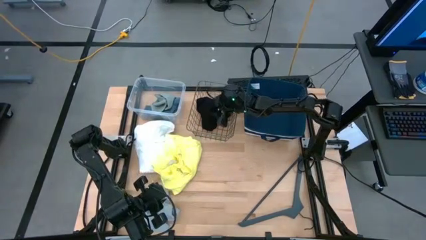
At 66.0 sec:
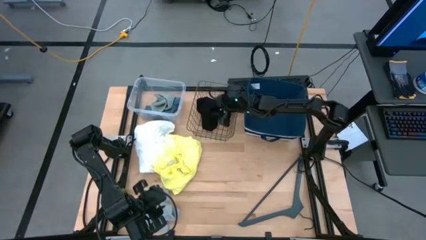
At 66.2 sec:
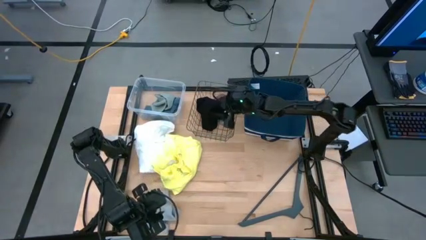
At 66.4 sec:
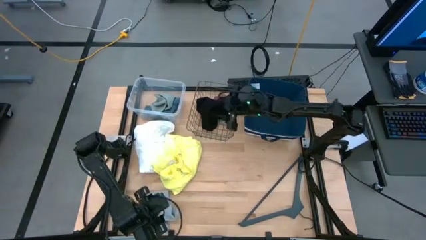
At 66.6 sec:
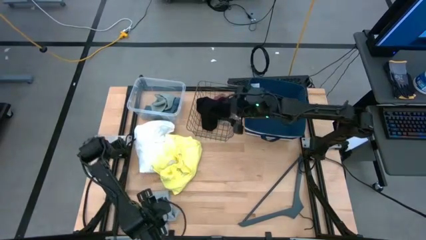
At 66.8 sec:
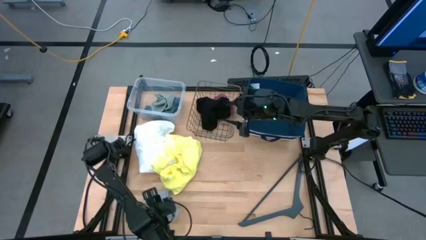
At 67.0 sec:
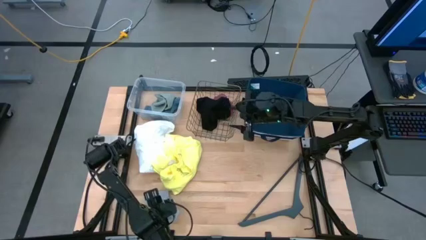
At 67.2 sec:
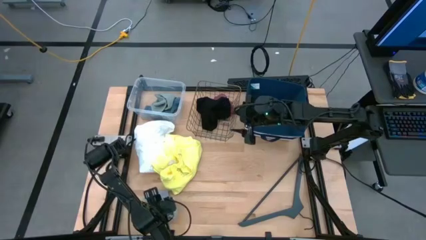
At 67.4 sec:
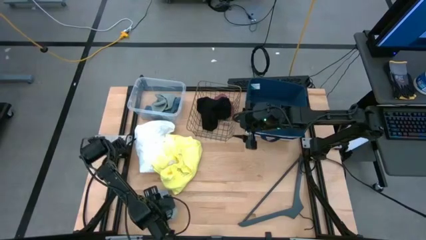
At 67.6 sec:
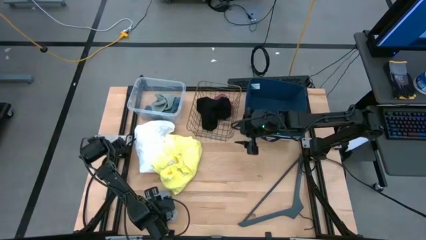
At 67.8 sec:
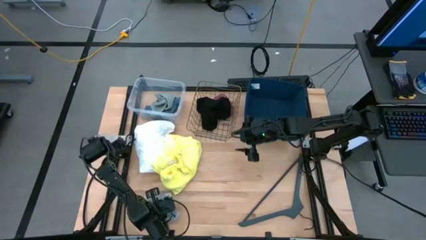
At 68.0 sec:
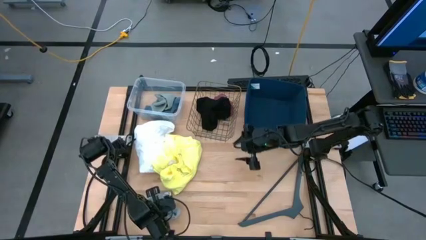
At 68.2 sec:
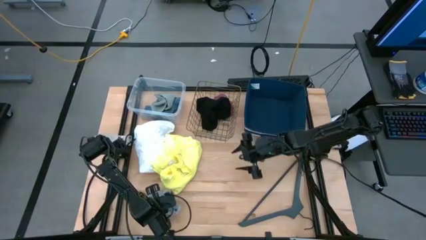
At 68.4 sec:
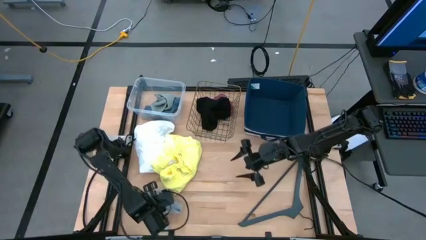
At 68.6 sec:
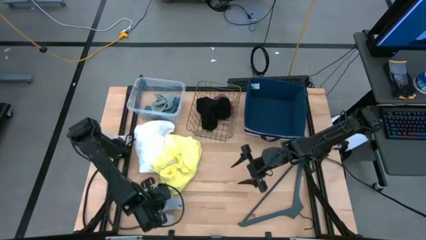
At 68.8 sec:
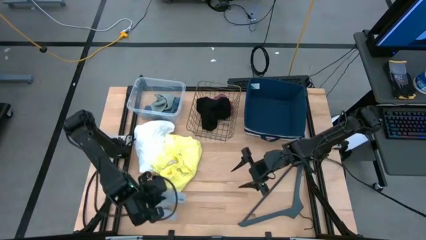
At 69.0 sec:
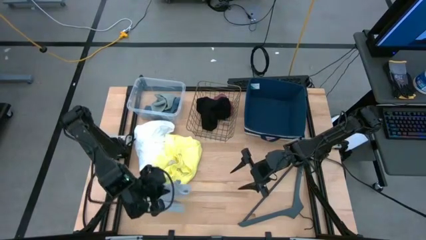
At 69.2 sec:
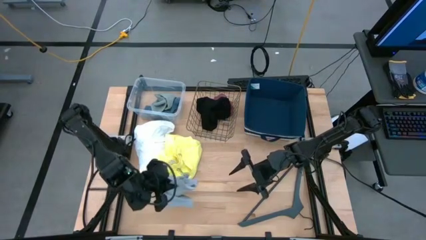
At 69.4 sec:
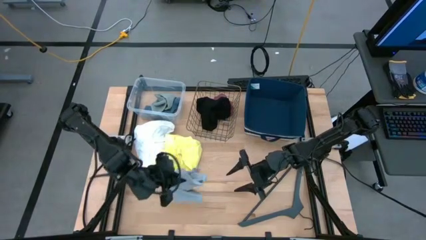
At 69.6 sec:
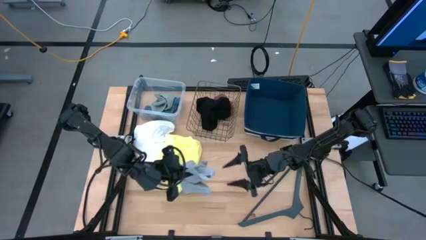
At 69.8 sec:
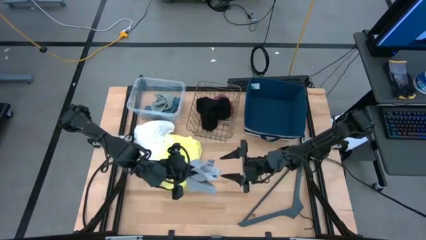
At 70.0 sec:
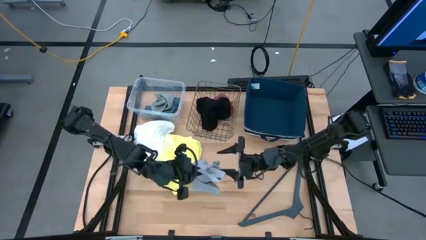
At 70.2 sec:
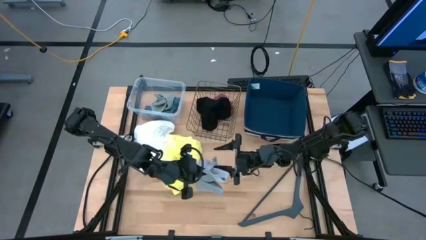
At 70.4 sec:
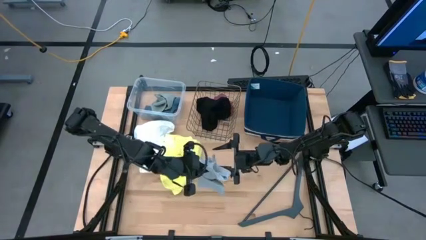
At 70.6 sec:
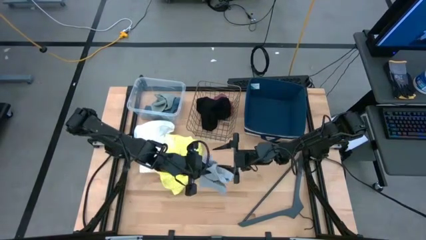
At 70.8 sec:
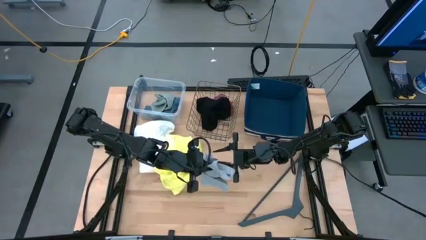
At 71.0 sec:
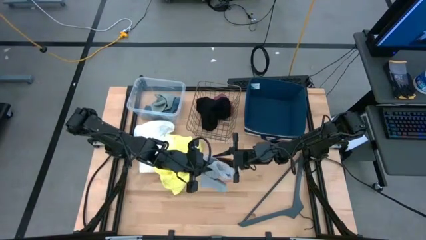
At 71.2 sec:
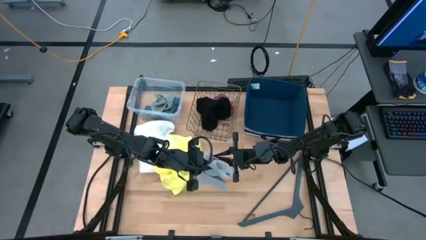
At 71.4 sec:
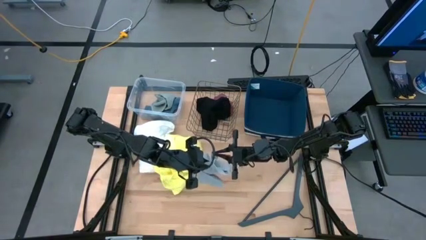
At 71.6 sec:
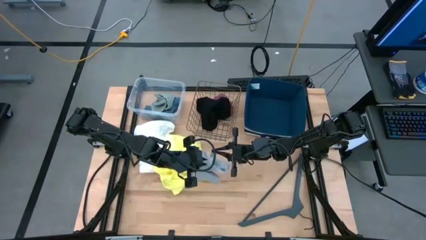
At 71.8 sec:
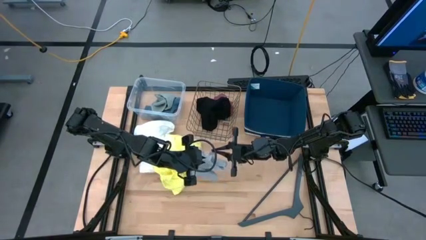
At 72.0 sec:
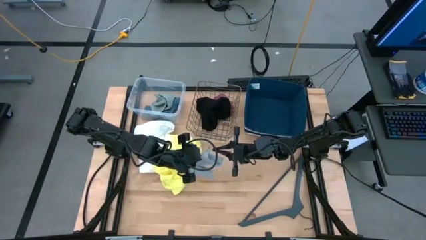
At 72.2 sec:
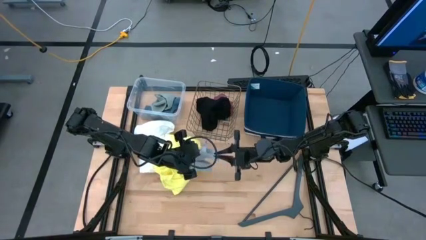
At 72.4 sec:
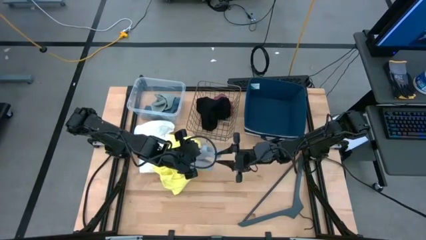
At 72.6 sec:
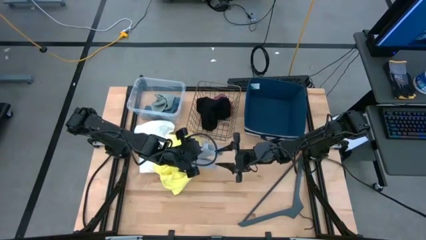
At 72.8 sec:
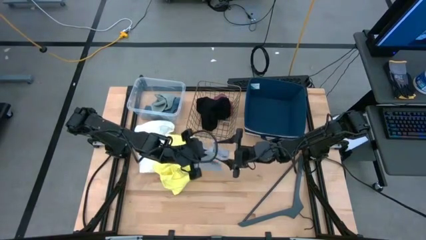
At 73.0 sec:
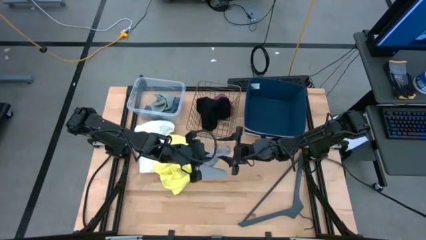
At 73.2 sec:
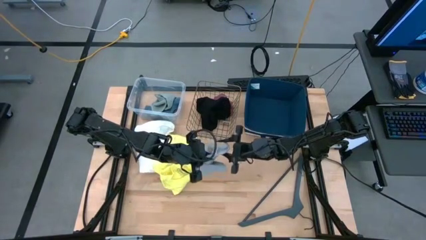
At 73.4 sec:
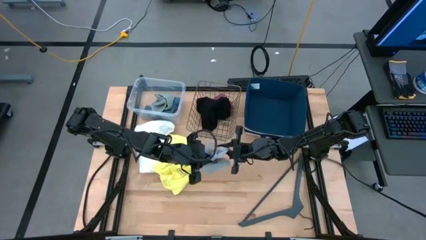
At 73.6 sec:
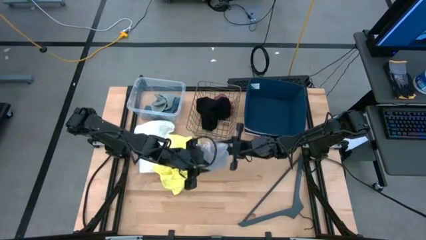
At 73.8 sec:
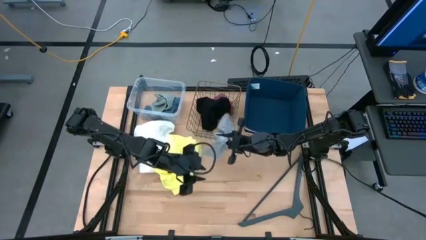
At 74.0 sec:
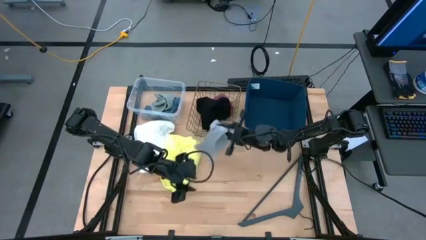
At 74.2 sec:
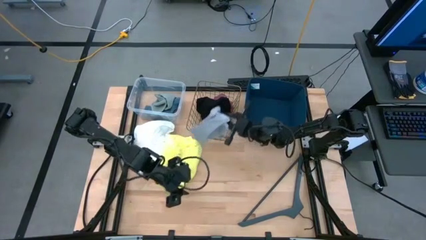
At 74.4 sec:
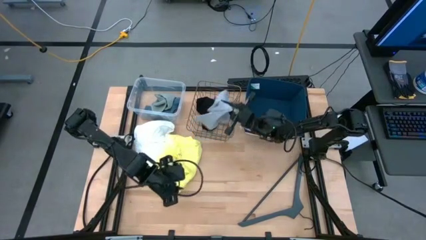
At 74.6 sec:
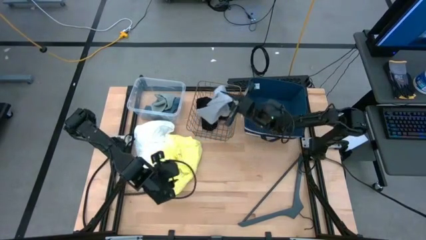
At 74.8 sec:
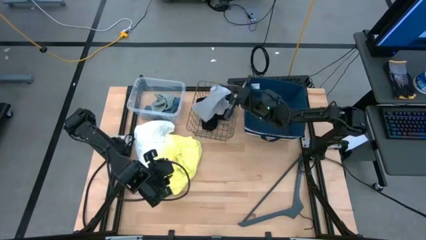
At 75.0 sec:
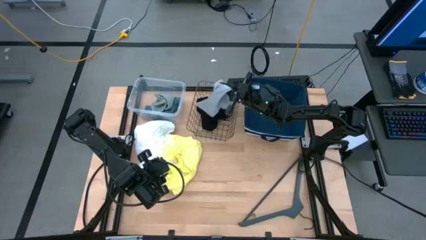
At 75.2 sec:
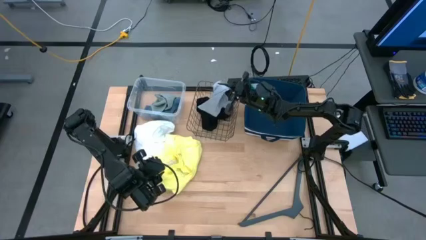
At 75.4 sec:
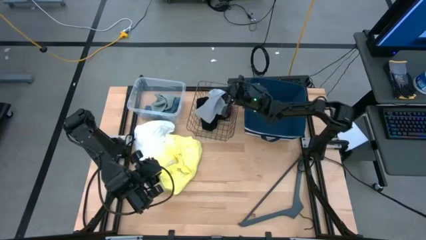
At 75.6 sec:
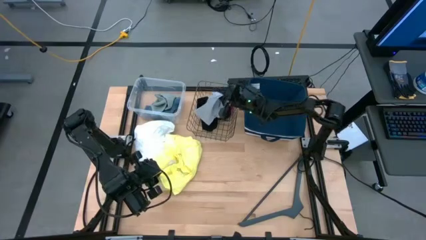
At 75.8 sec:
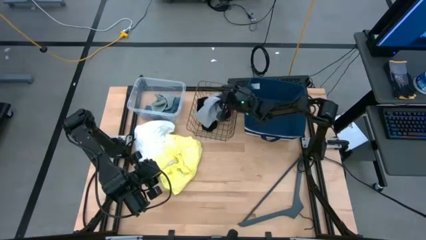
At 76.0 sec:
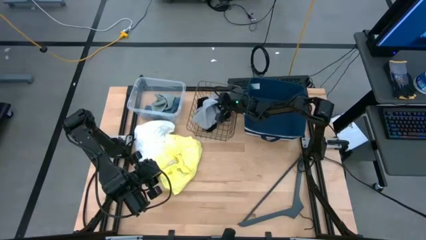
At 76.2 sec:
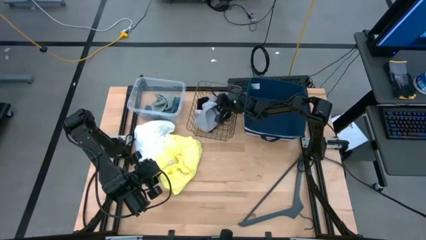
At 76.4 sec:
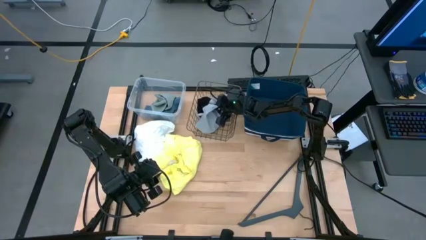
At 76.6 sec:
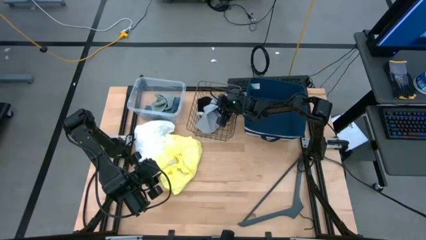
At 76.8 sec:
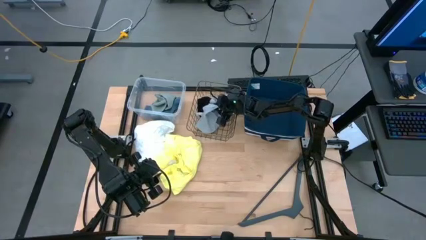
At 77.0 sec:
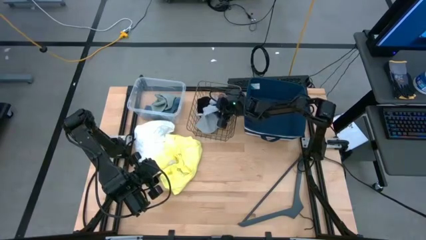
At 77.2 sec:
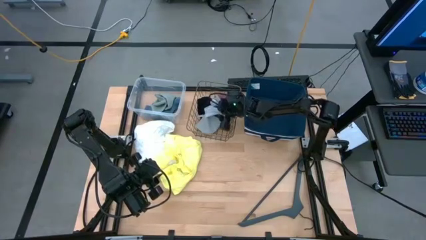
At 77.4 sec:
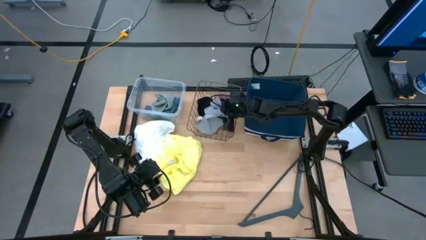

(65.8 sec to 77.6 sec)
Task: Pick & Place Cloths
Put the gray boxer into the gold wire basket

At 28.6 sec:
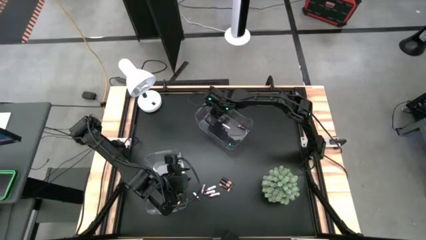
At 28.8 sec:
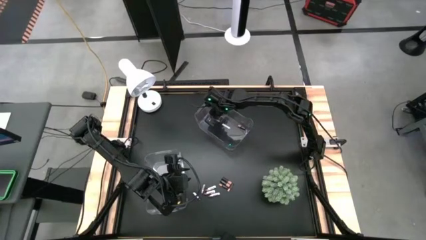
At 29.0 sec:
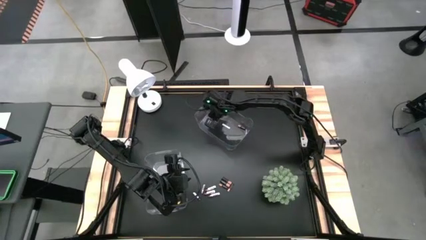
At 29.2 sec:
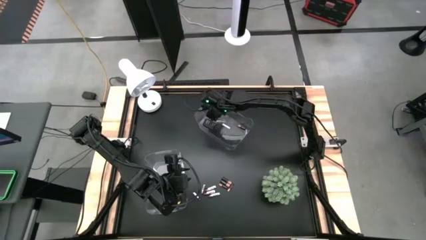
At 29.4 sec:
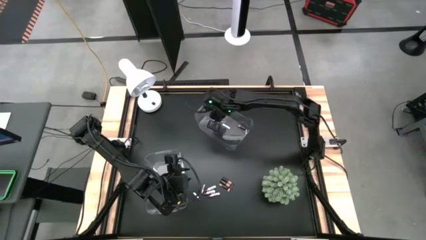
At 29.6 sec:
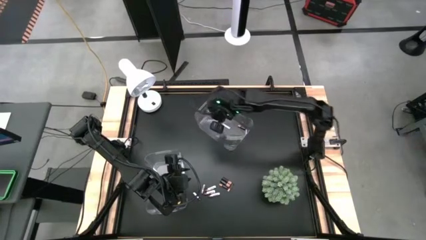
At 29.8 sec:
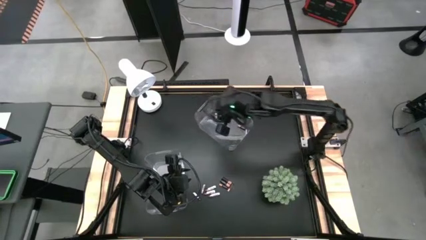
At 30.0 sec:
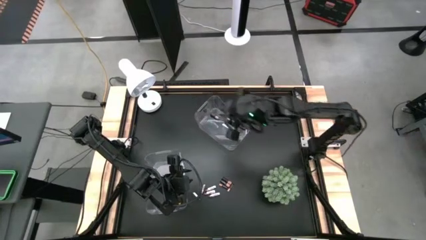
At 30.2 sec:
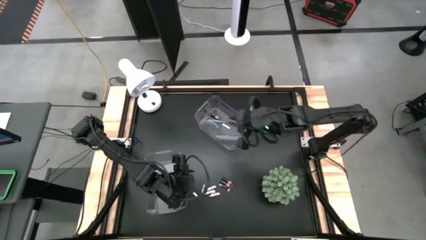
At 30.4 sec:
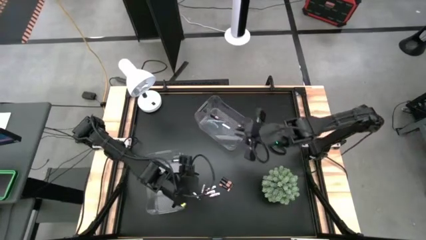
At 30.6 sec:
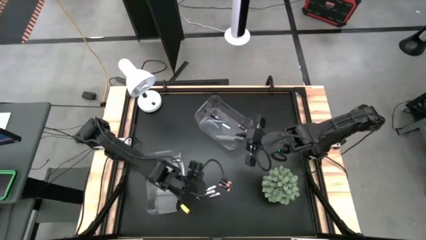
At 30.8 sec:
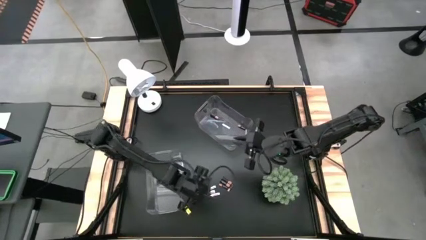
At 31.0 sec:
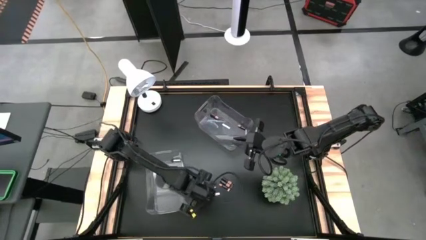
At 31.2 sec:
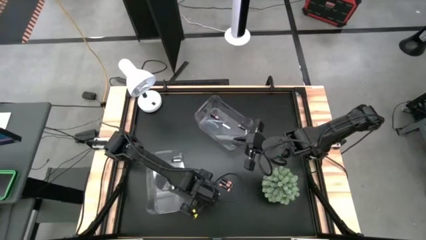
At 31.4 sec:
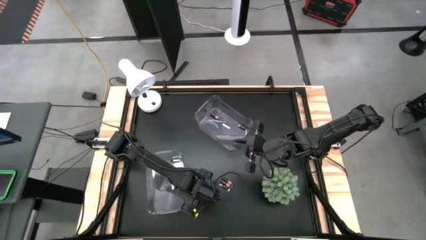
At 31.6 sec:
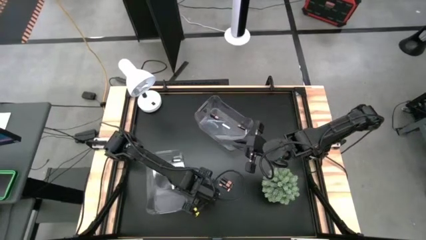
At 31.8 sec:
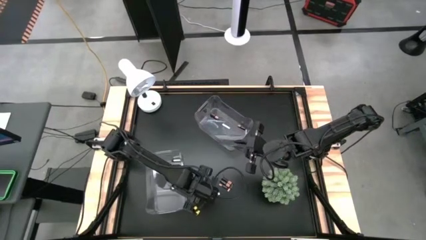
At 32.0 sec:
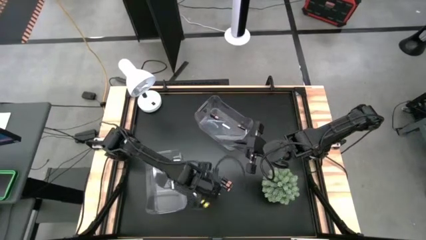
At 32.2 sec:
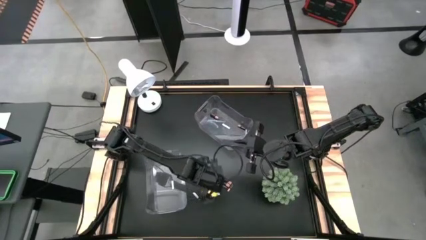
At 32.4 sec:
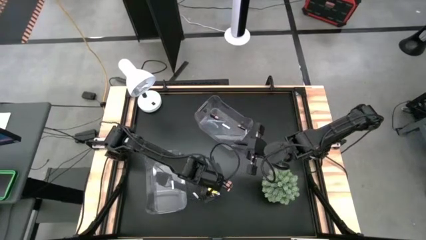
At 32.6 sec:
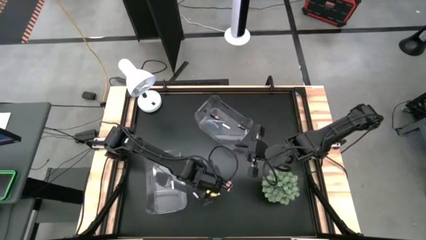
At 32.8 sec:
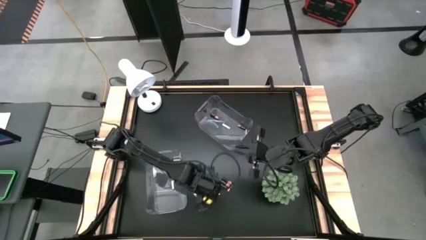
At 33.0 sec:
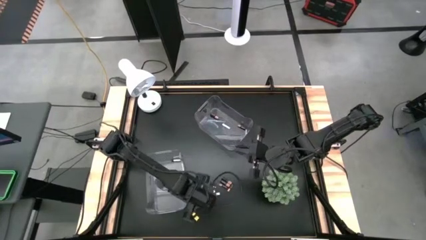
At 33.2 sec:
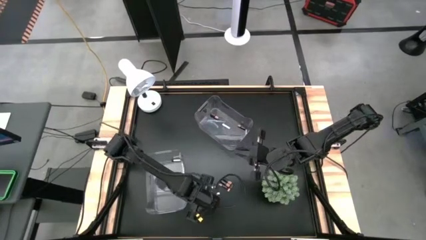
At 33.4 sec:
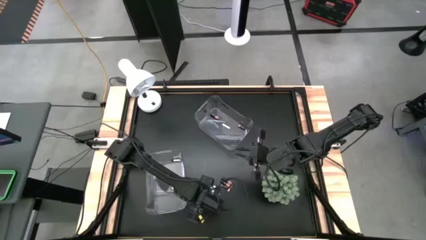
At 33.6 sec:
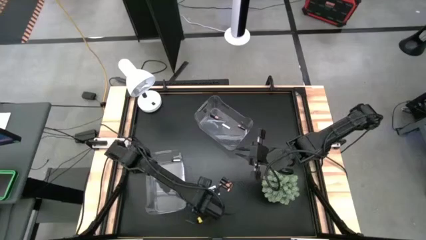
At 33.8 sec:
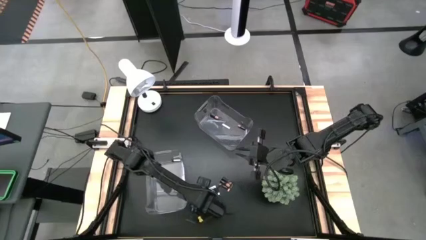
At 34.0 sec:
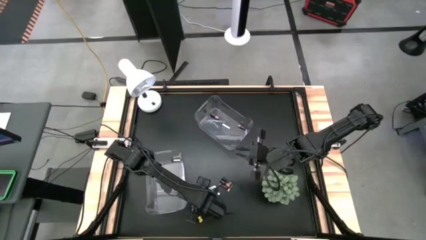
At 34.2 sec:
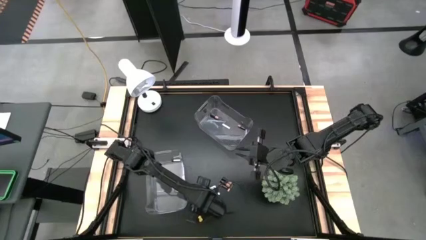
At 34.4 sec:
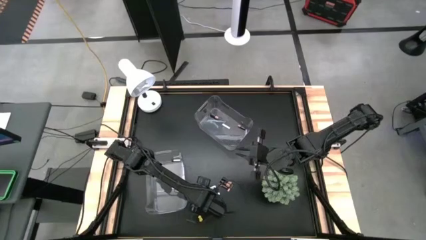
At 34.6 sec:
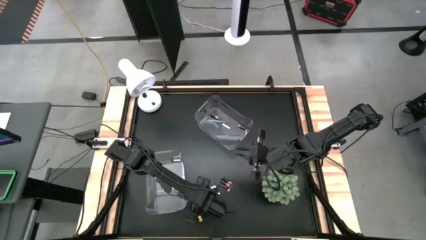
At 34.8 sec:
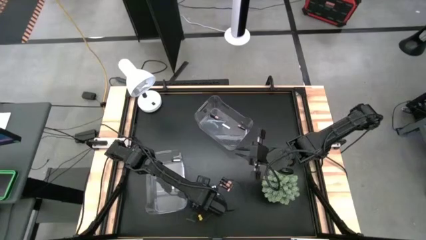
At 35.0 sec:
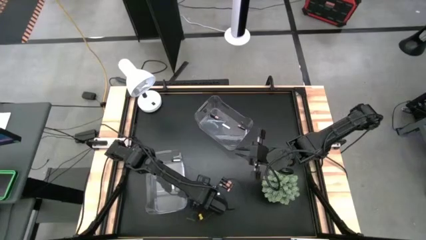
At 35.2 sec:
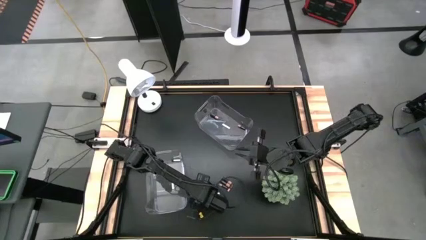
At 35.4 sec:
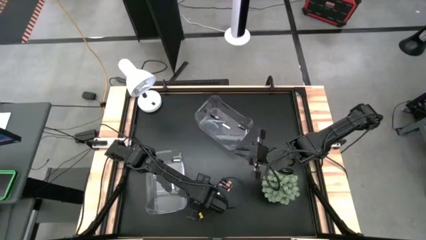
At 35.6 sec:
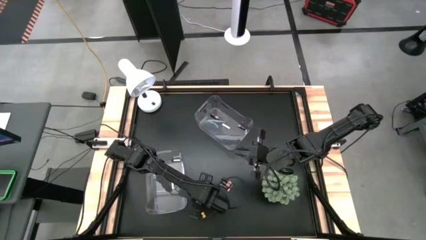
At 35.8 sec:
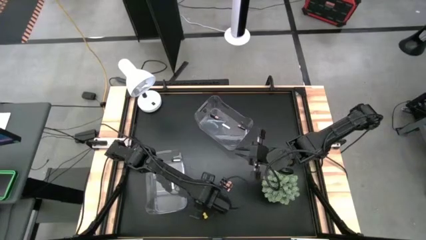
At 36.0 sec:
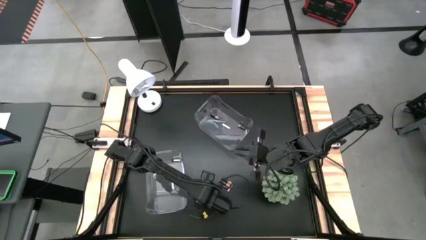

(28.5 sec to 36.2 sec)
Task: Sort batteries
Put the silver battery into the bottom transparent bin
